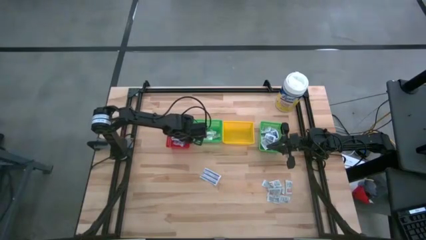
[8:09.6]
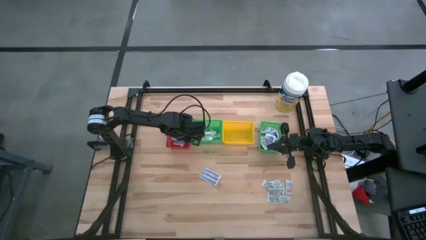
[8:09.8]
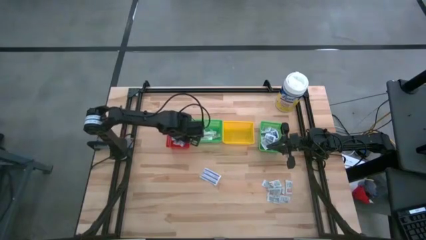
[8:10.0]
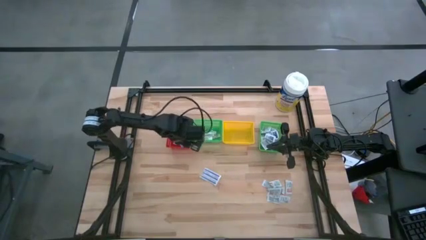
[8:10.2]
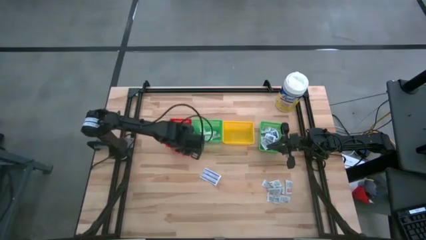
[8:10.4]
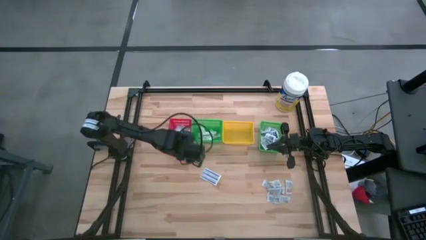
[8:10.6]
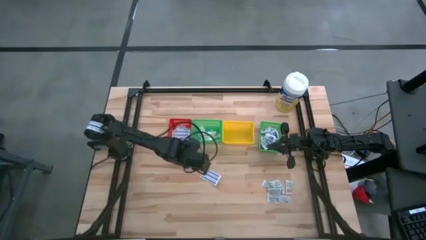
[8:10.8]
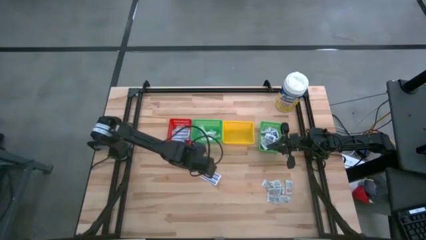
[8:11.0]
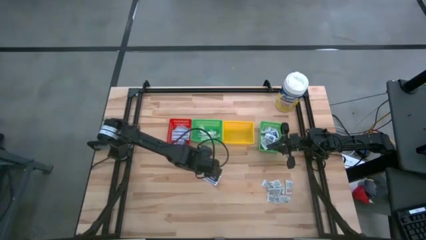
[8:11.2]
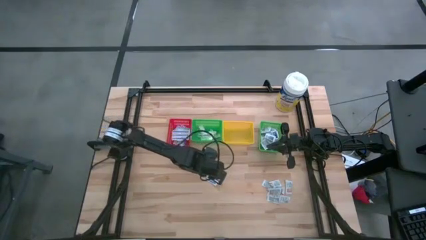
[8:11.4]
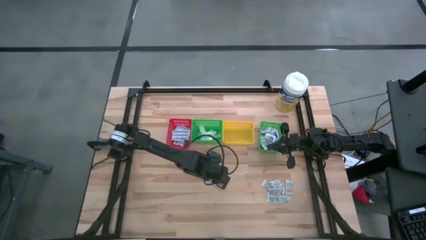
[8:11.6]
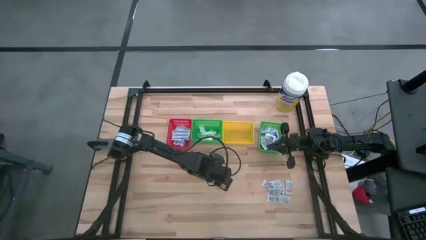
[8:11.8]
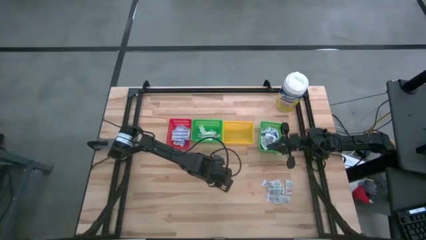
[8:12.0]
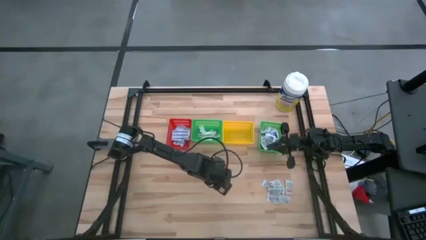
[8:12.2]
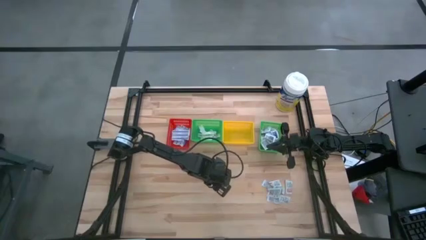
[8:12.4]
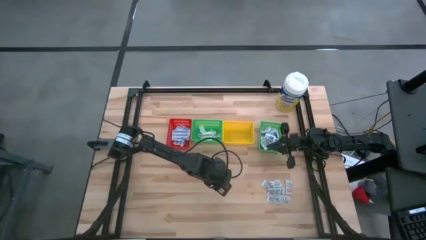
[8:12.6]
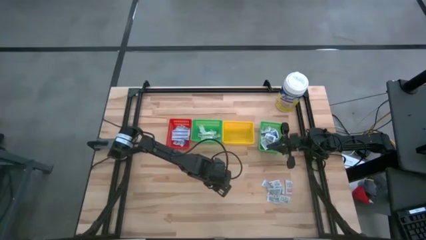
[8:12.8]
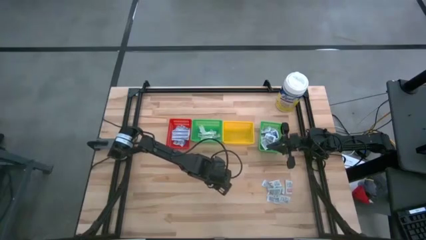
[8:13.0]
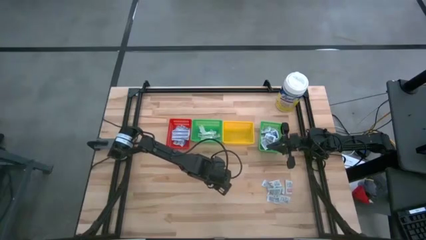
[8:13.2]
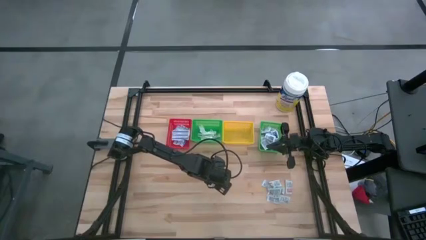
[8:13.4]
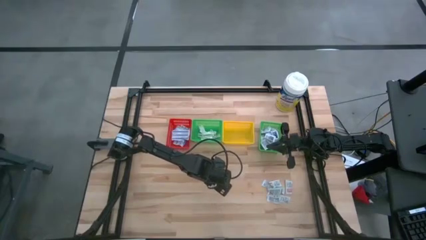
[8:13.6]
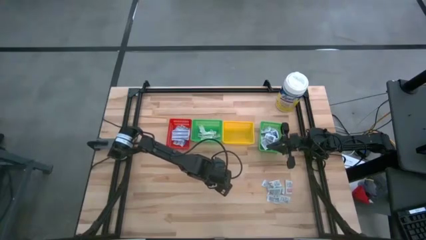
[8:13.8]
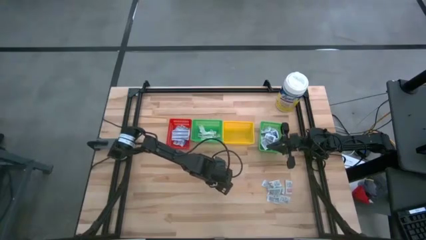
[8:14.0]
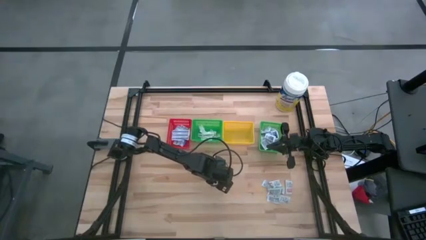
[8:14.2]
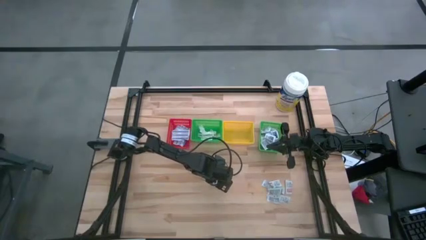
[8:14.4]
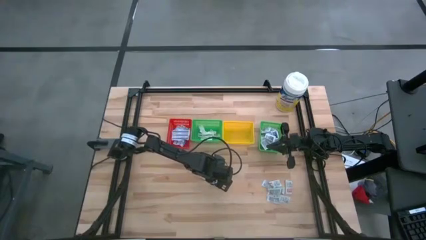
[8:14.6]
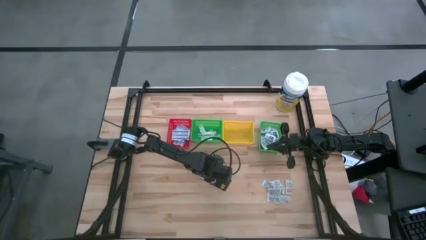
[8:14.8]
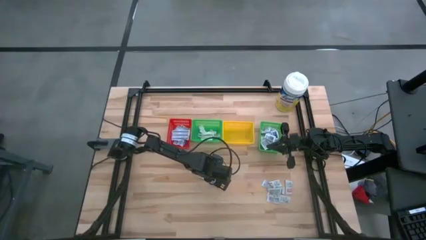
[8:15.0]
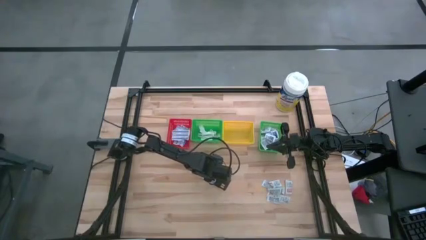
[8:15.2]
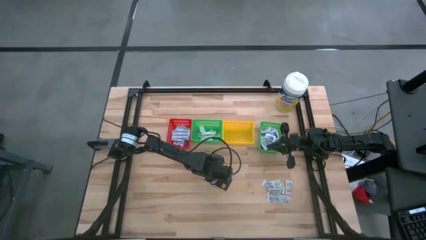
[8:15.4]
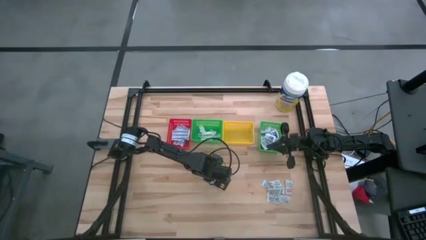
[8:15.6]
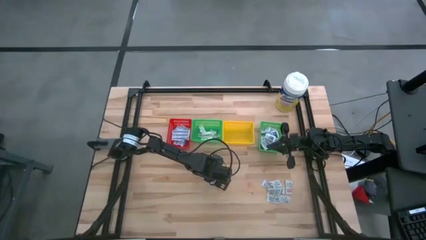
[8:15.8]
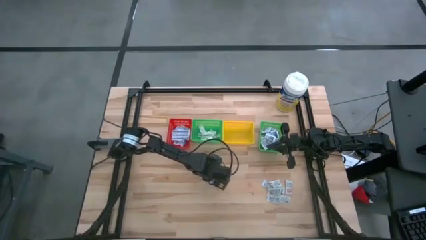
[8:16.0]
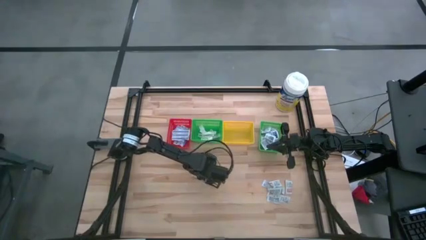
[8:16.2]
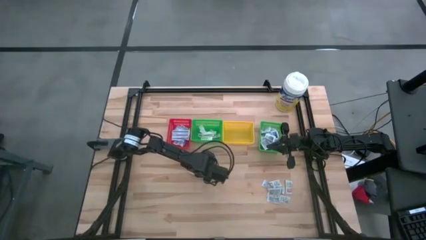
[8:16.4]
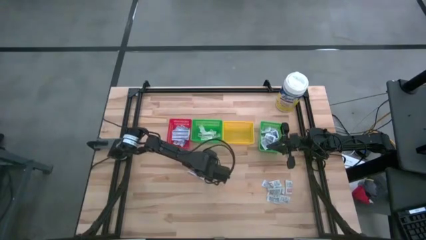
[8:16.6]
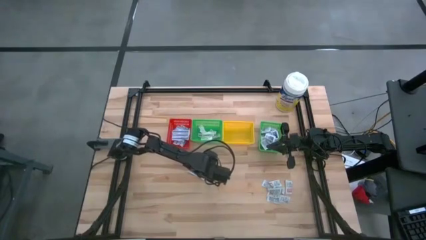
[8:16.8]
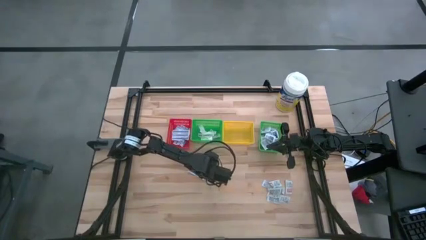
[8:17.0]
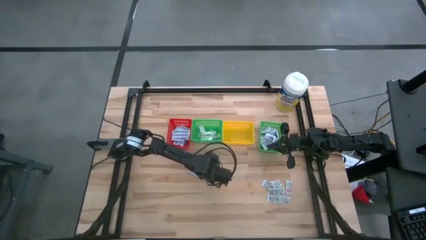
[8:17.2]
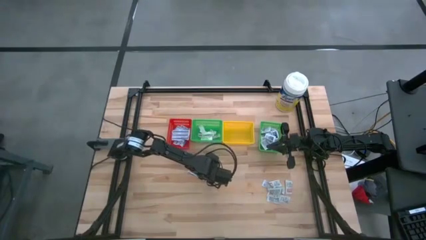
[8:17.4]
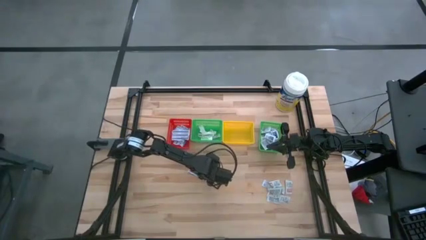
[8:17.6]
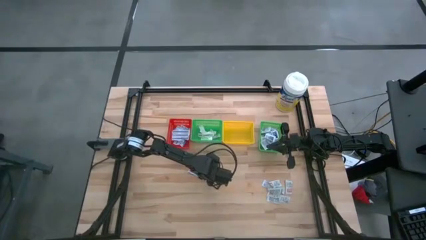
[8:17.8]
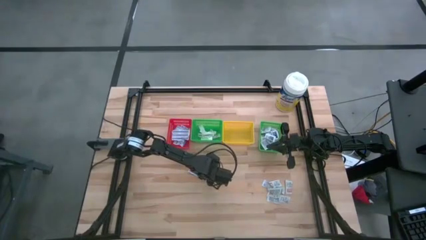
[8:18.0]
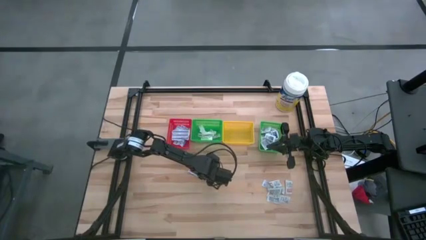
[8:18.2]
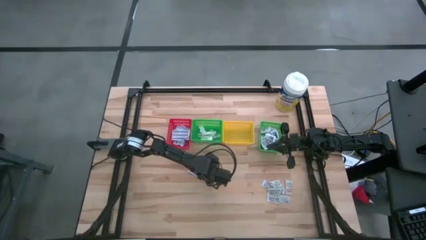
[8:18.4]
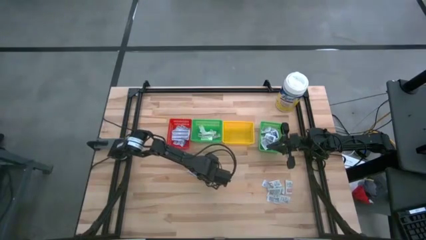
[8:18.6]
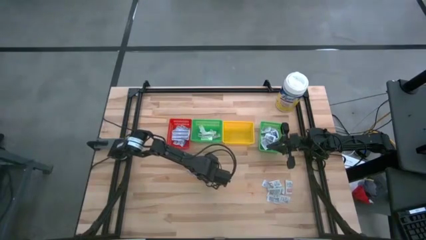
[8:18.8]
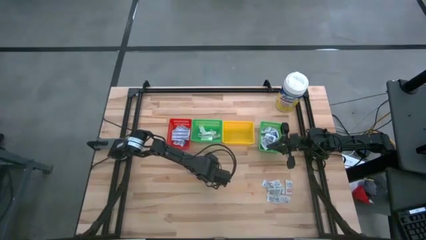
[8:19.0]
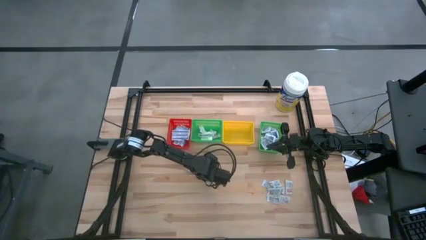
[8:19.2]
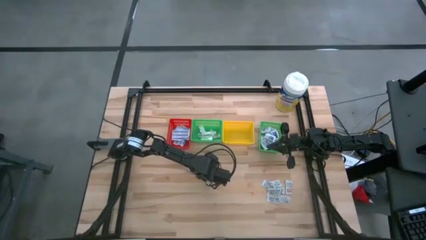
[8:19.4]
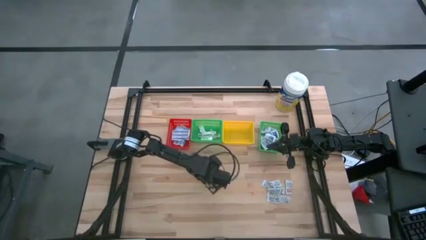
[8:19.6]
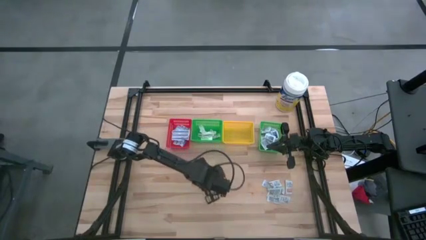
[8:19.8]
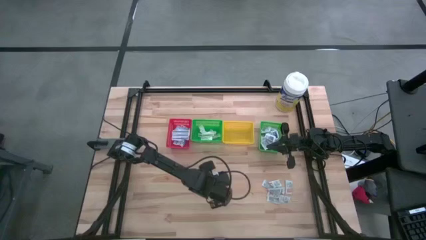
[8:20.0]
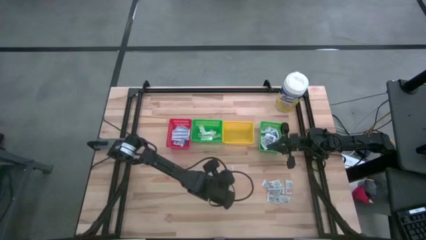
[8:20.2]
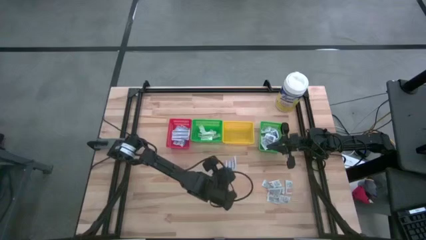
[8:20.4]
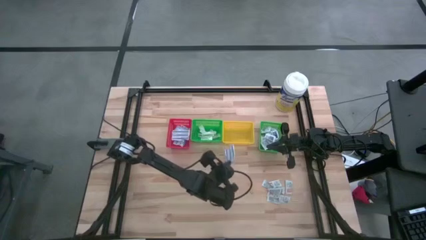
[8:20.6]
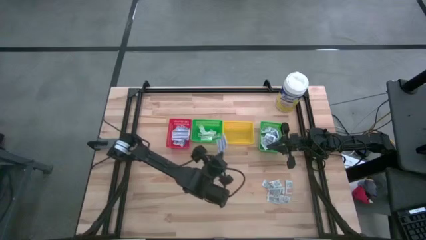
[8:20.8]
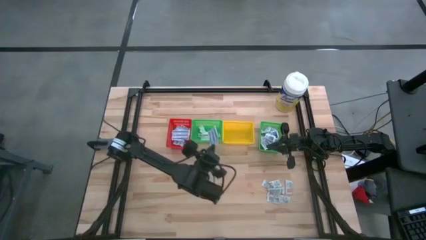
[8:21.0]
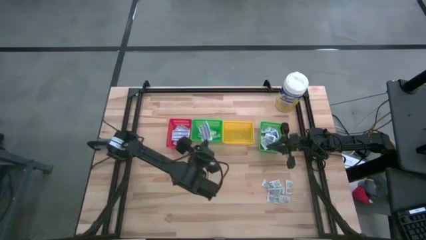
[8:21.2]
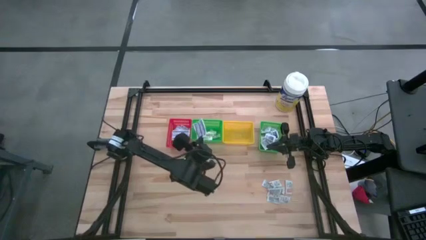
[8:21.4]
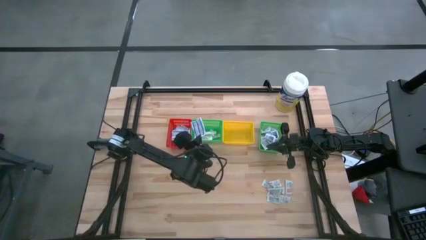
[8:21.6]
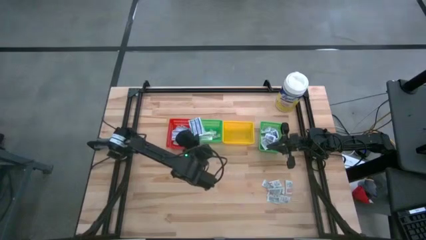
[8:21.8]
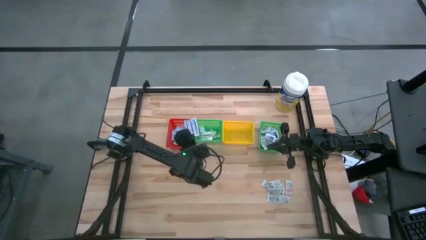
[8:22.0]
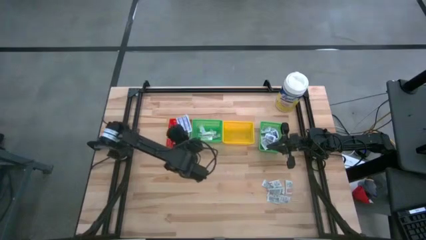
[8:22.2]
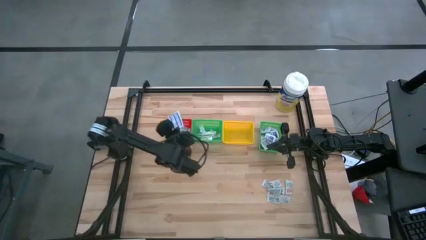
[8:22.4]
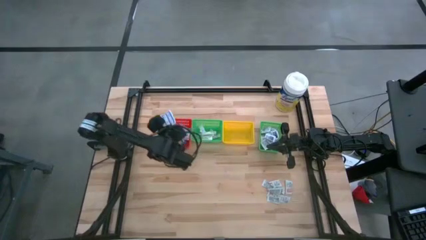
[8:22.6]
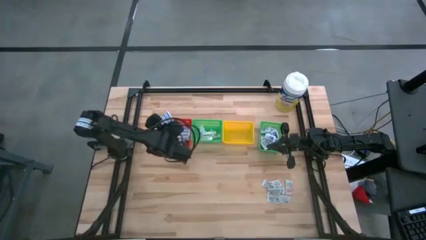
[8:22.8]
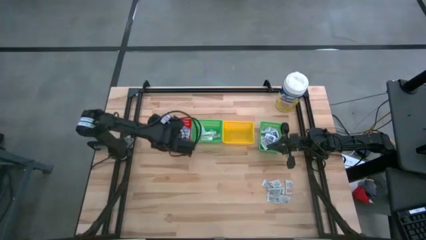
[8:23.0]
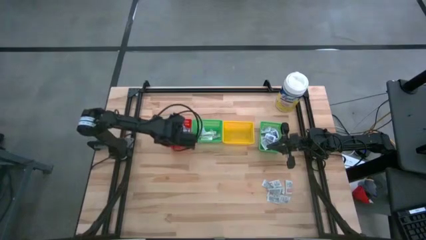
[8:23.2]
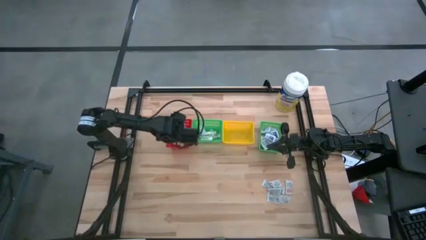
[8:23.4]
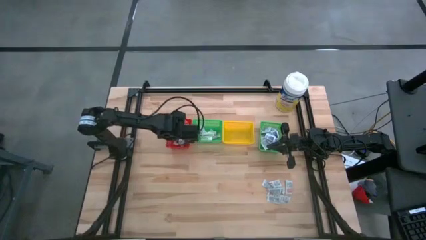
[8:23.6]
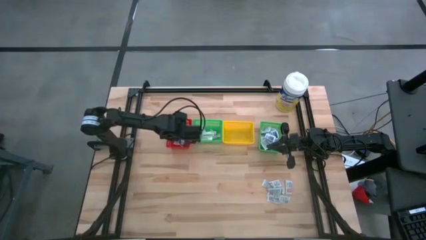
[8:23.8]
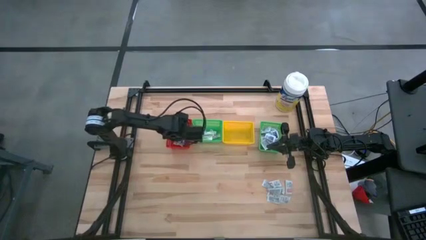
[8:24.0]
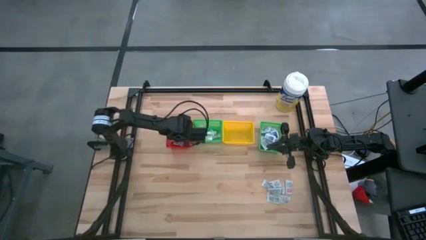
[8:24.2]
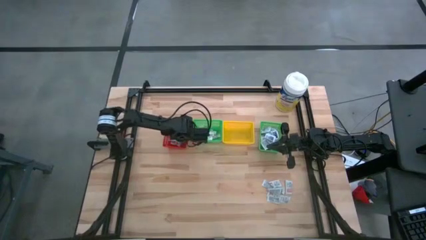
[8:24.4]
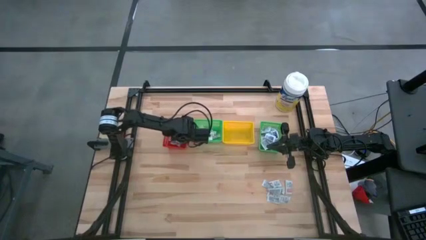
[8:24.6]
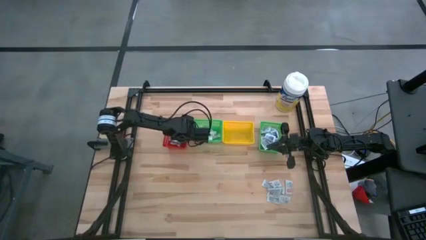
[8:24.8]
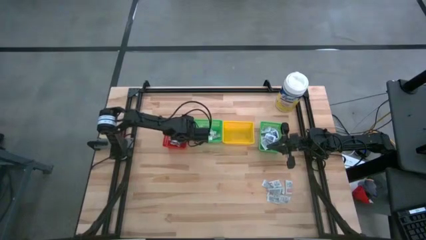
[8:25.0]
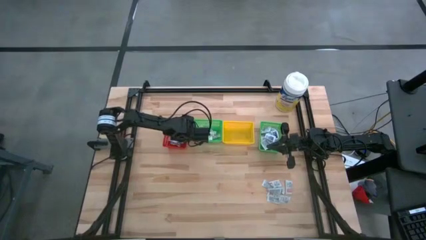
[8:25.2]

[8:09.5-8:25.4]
Task: Pick & Place First Aid Supplies
Put the blue bandage into the red bin

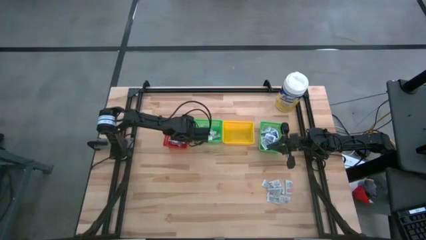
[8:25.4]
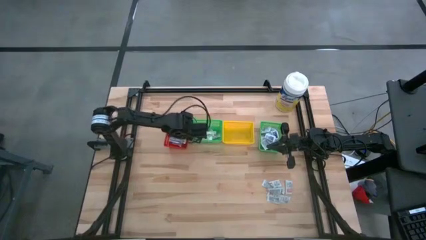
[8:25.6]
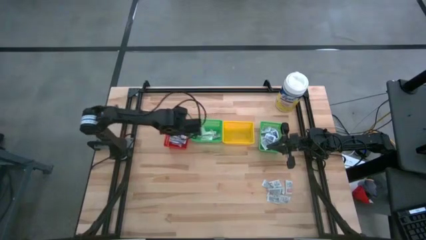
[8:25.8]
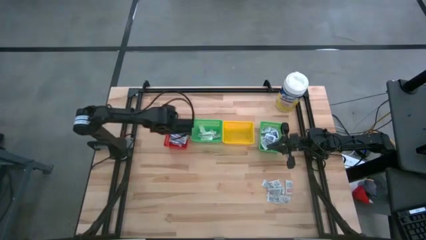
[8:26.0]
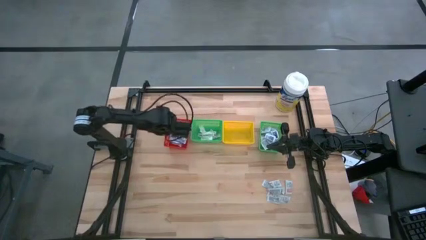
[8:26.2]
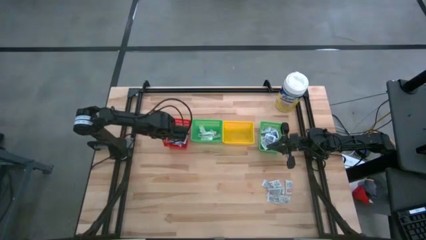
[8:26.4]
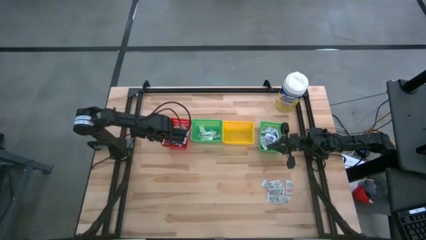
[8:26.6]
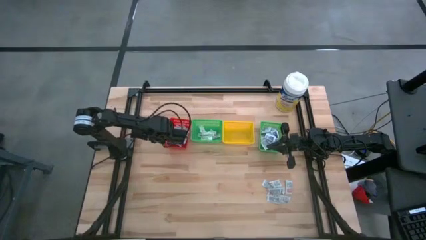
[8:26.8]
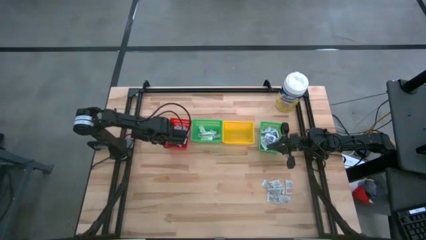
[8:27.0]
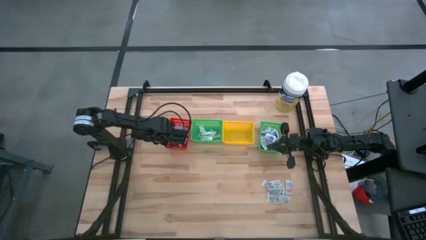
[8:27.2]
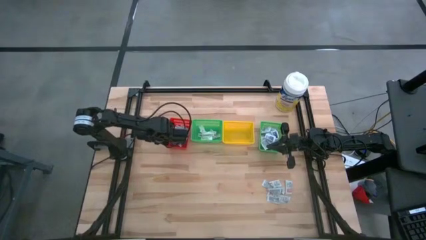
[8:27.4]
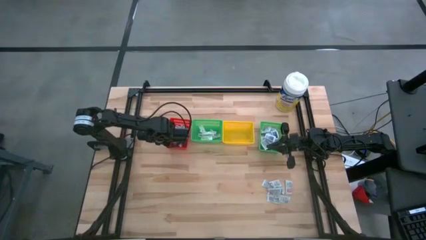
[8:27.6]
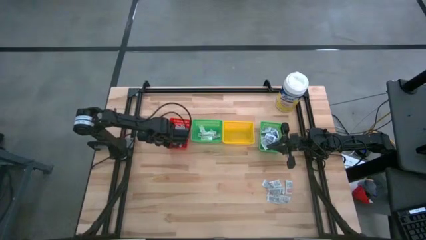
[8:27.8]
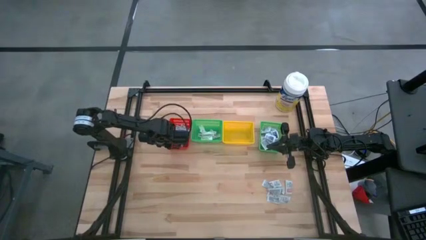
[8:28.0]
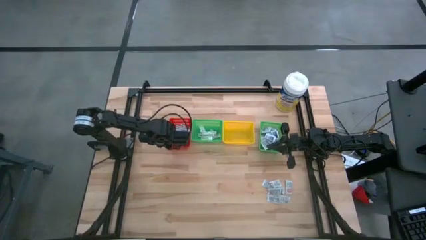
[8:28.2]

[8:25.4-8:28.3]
Adjust the red bin
